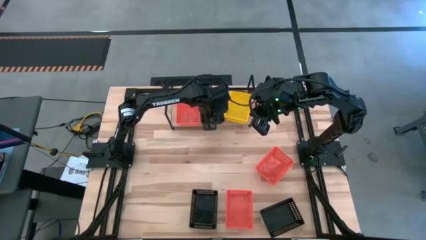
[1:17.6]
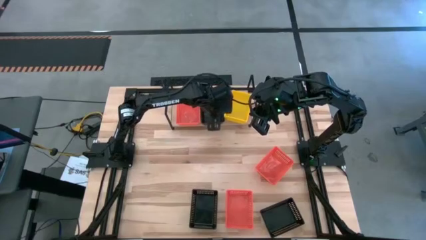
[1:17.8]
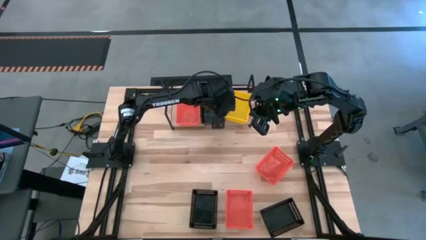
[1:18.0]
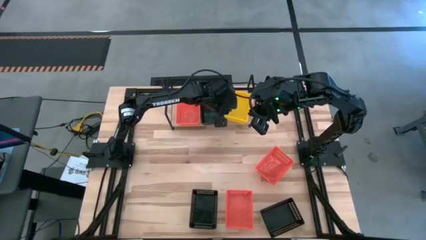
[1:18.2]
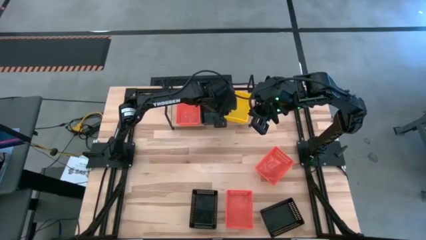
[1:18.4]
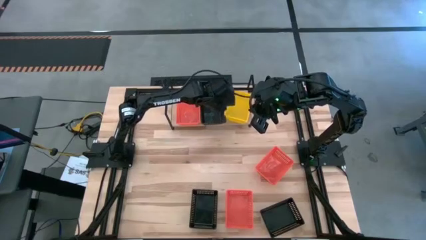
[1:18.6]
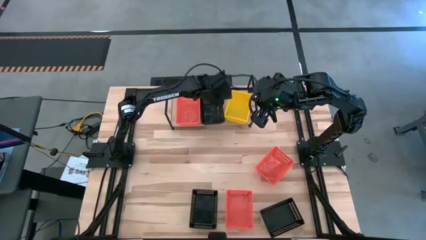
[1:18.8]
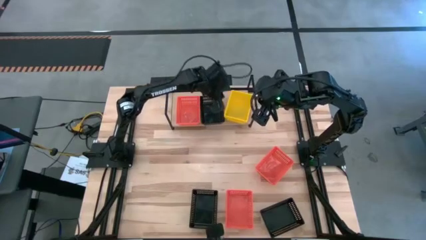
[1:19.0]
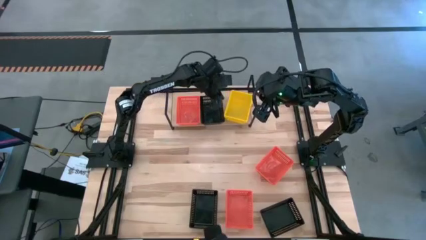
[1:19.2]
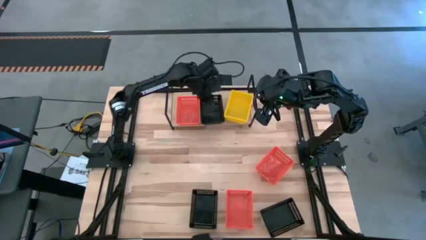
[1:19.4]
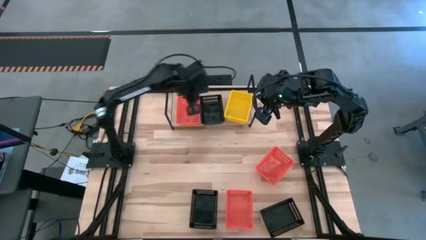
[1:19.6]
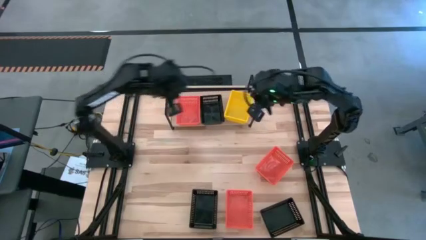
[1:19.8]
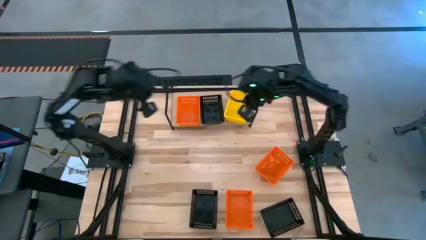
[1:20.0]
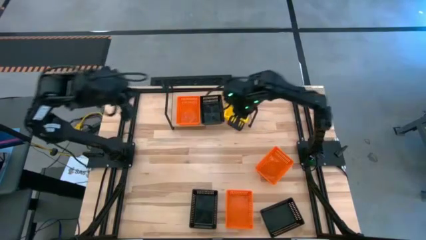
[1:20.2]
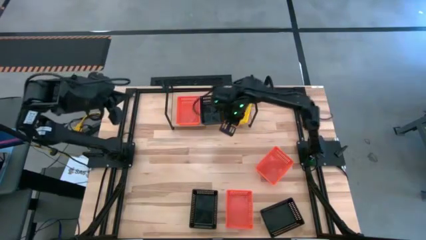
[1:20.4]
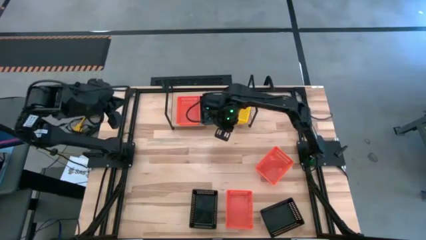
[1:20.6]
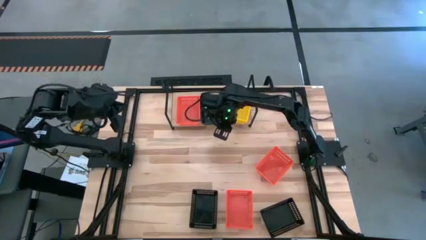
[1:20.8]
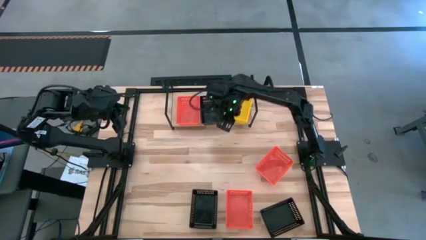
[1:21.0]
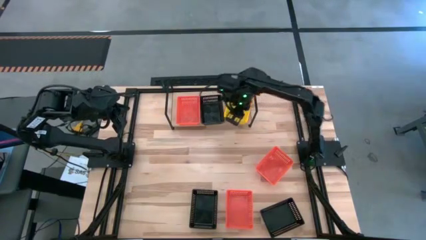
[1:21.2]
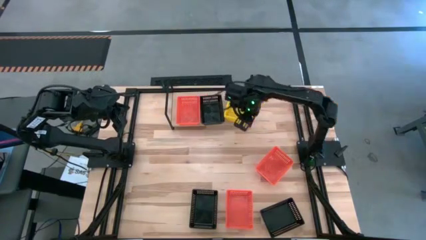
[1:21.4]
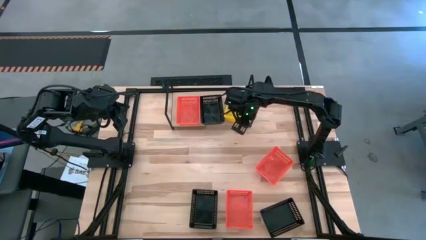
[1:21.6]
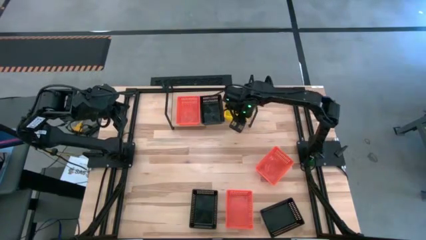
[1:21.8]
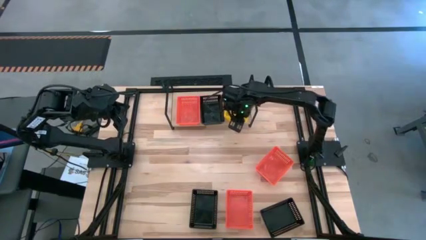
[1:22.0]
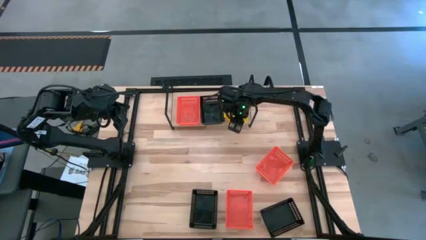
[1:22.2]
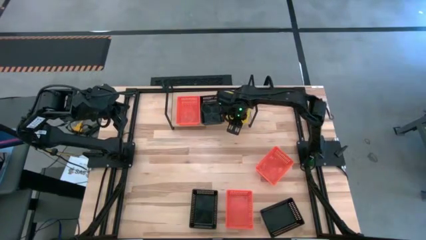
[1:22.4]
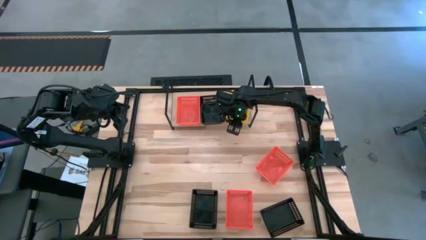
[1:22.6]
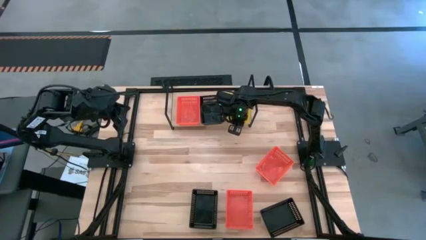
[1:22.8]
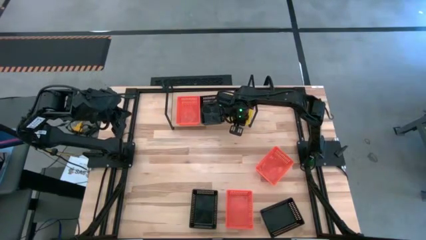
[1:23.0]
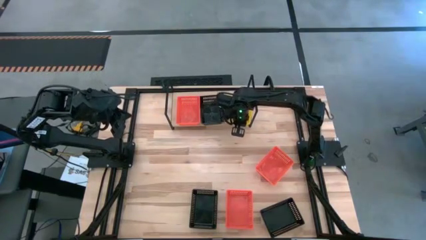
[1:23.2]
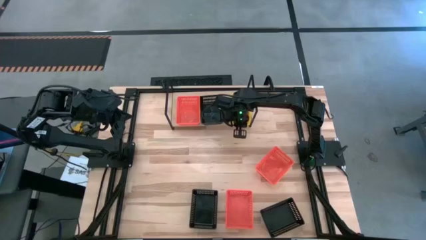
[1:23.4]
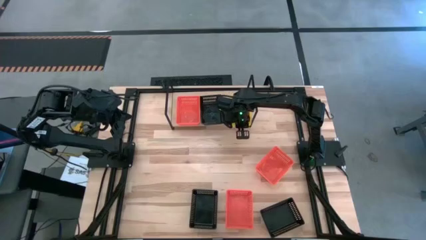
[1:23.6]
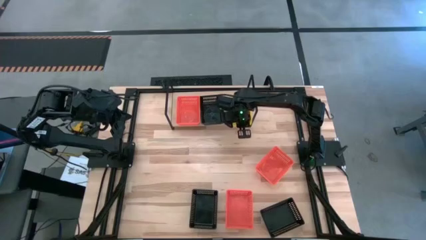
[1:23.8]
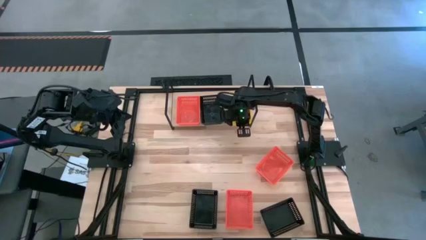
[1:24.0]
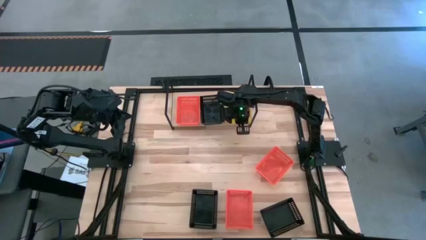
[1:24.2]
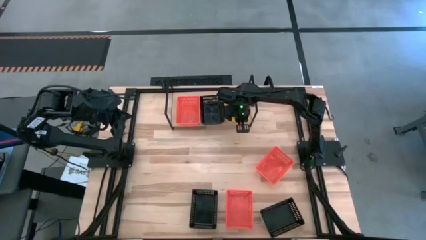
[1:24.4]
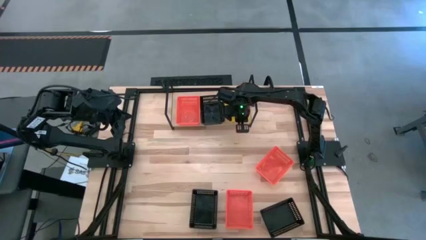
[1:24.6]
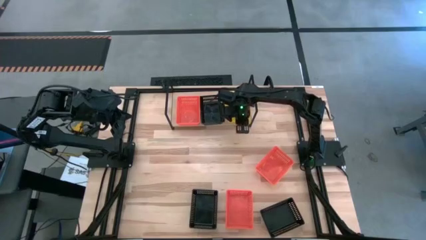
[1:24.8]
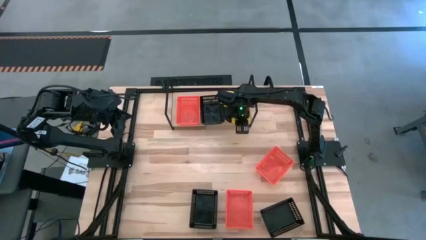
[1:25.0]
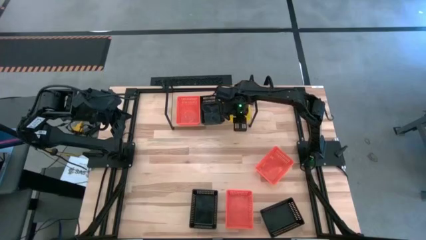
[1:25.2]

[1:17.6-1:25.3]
Task: Stack baskets on shelf by color
Adjust the stacked yellow basket on the shelf
